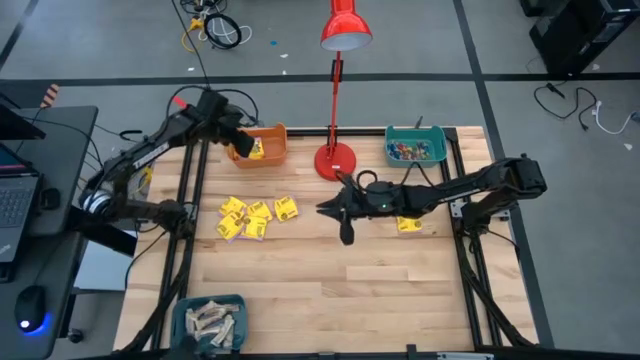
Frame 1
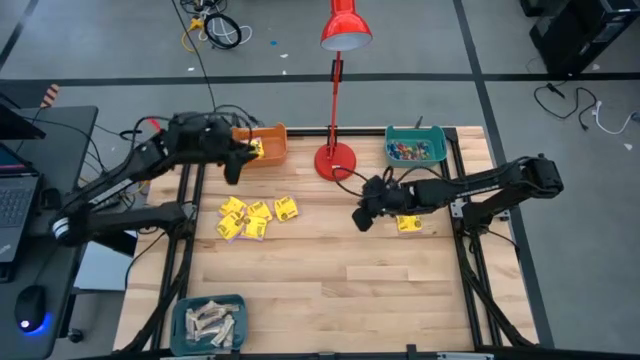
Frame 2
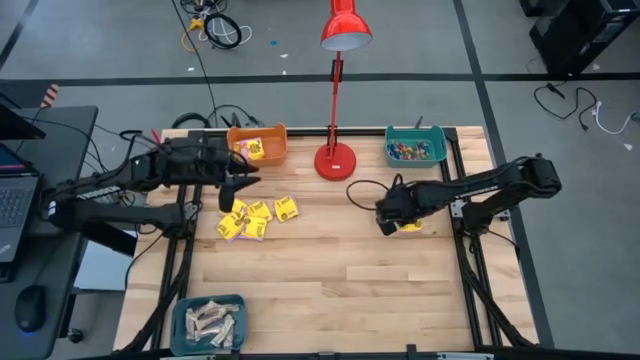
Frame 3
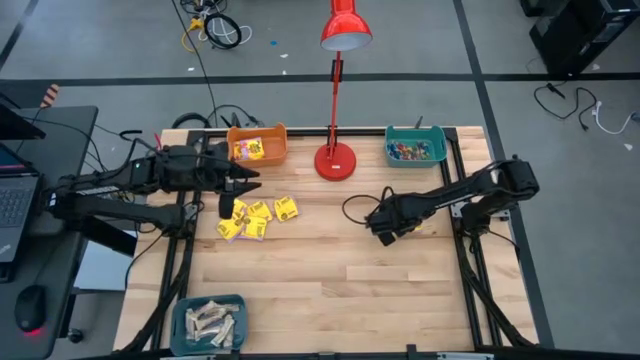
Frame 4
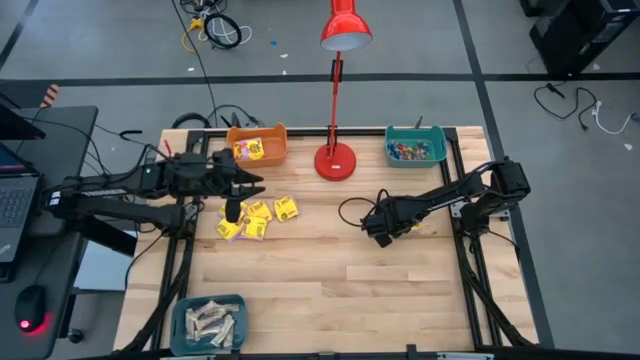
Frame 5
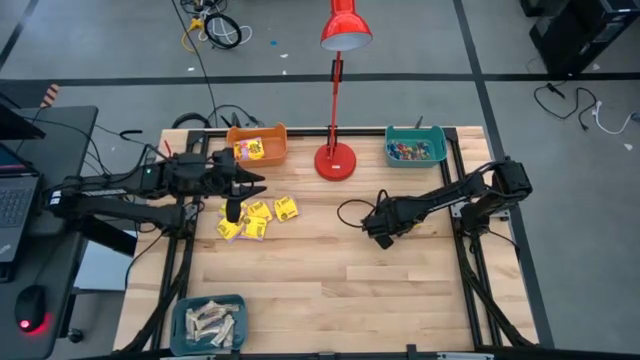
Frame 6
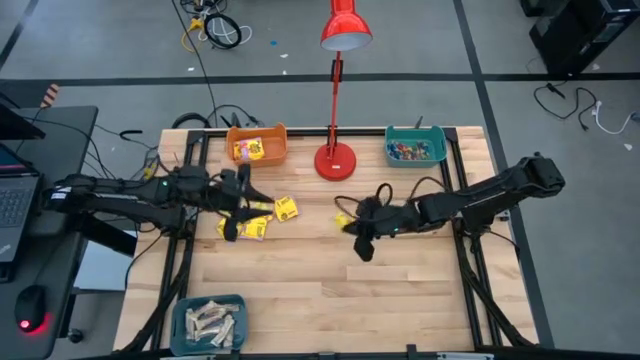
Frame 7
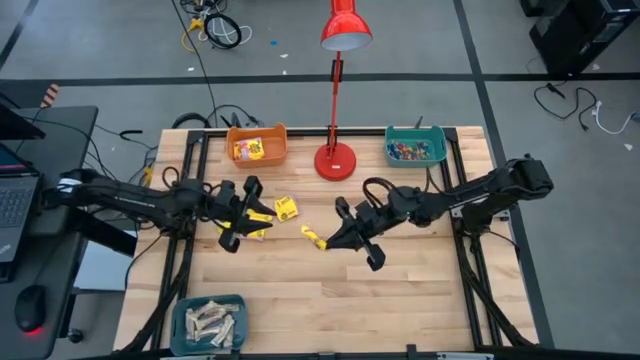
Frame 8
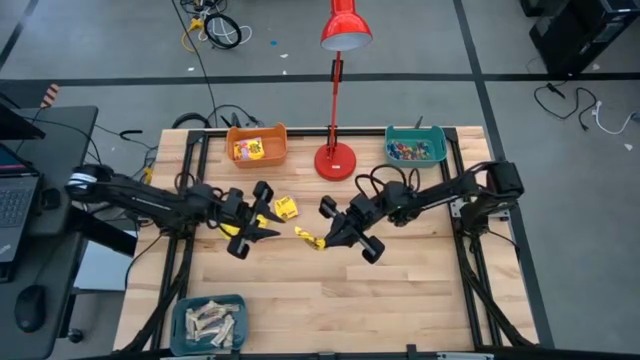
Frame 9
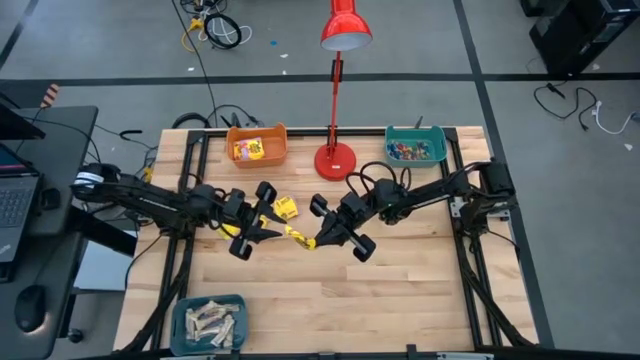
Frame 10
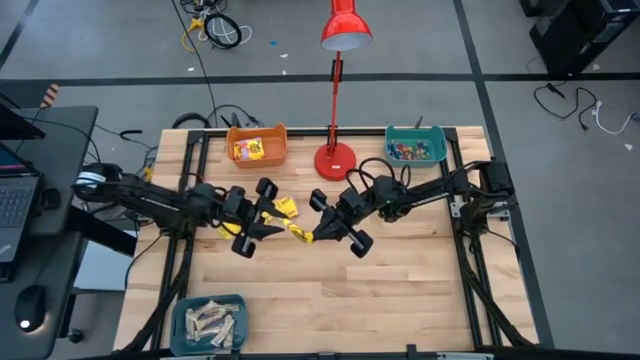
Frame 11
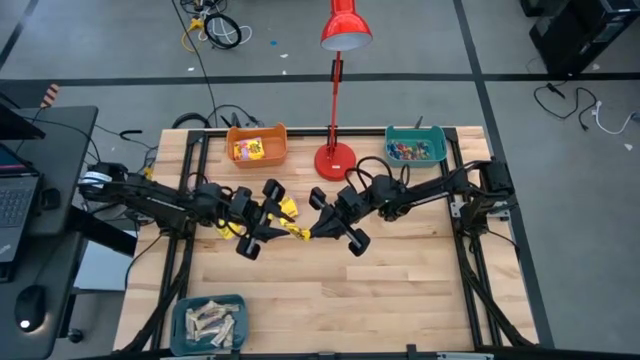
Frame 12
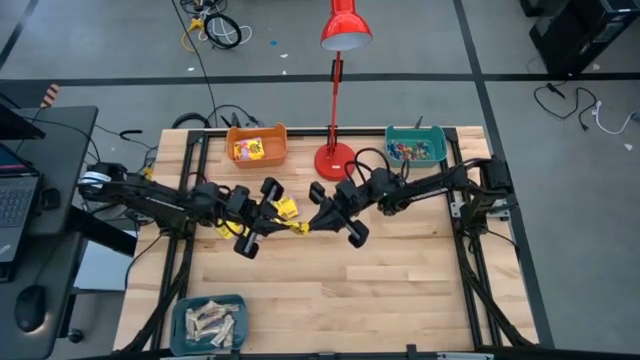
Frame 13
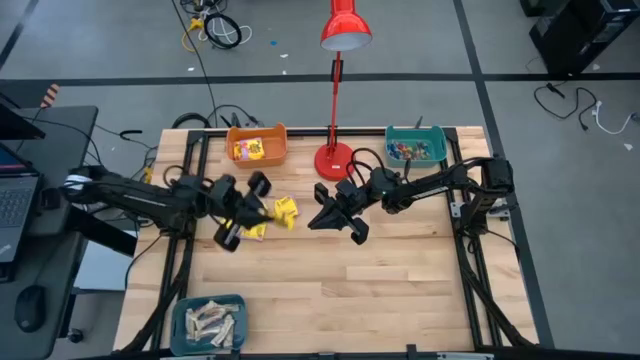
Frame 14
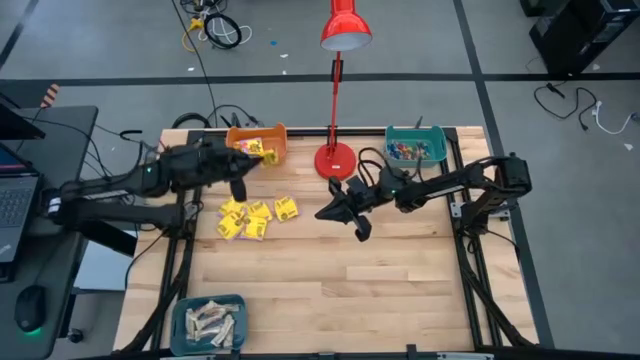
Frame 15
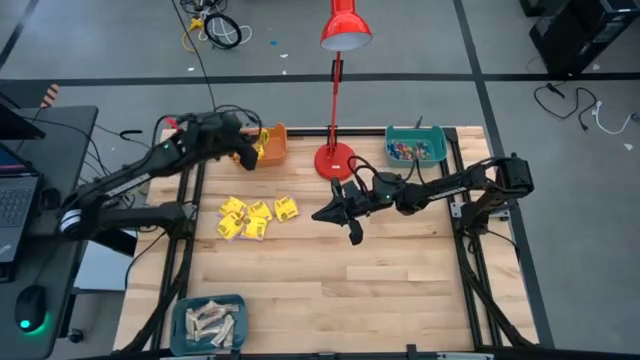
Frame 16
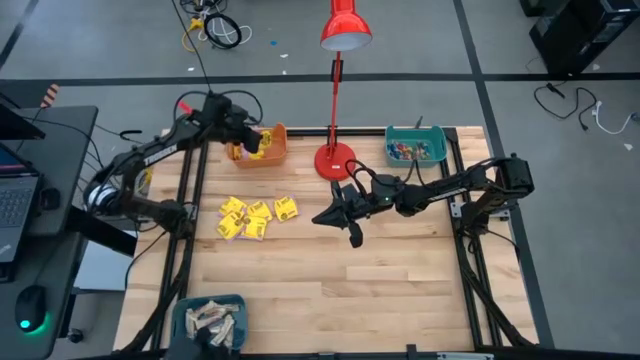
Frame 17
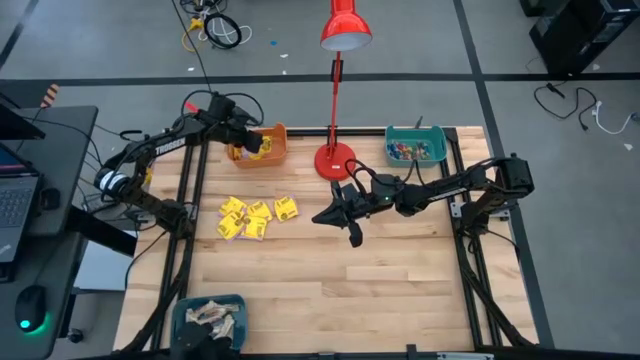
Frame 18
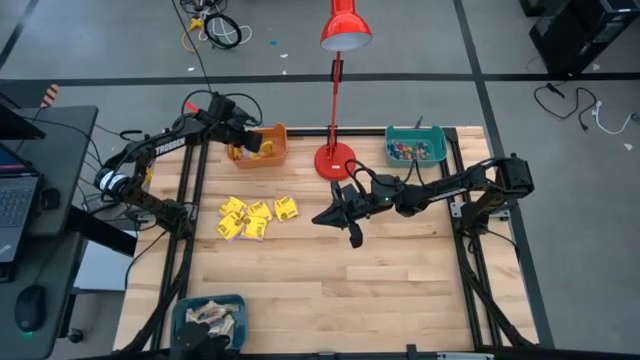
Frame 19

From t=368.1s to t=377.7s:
Task: Sort candy
Put the yellow candy into the orange bin

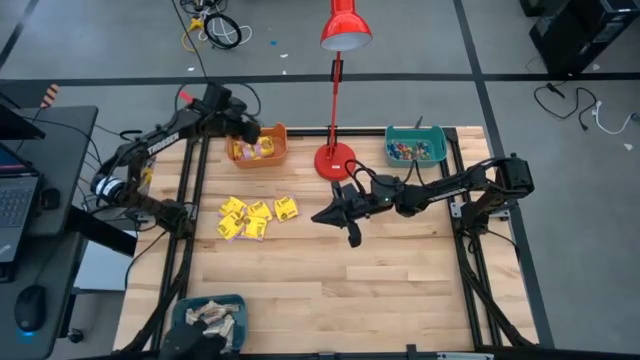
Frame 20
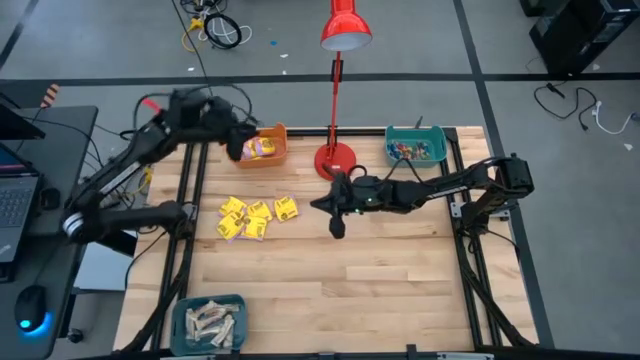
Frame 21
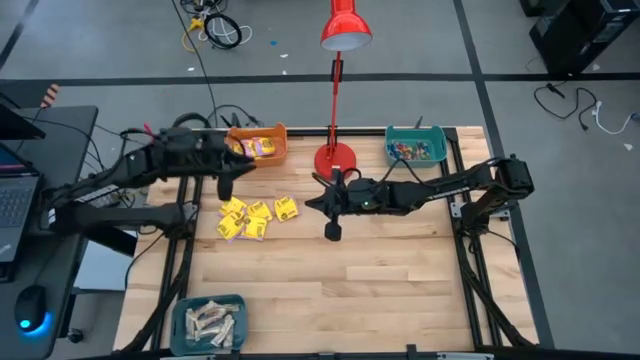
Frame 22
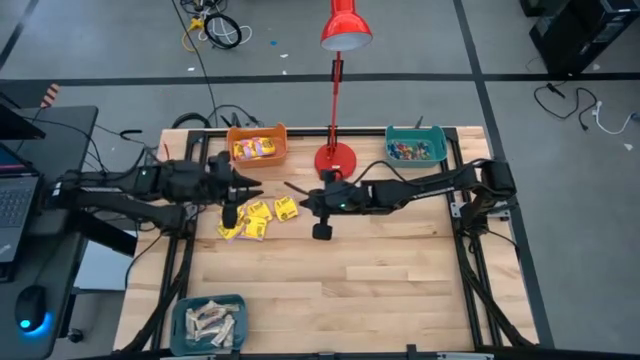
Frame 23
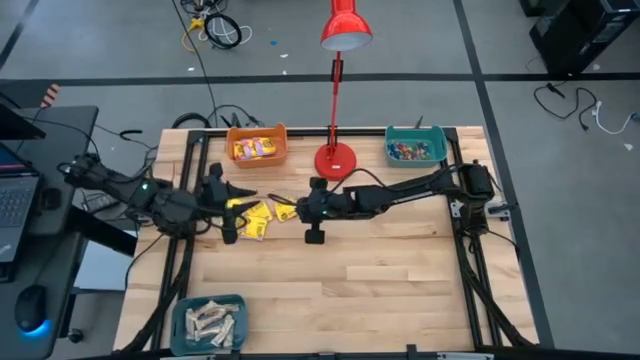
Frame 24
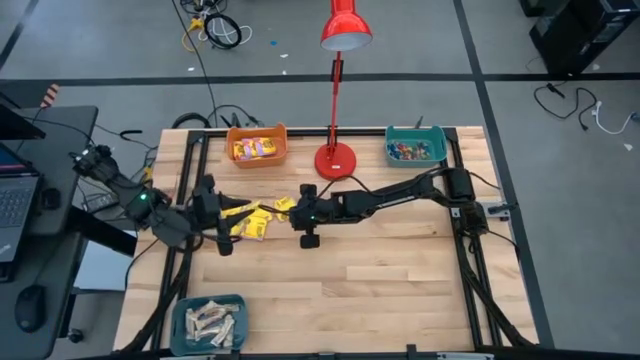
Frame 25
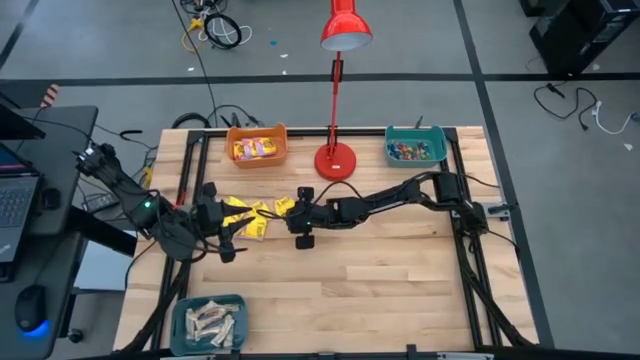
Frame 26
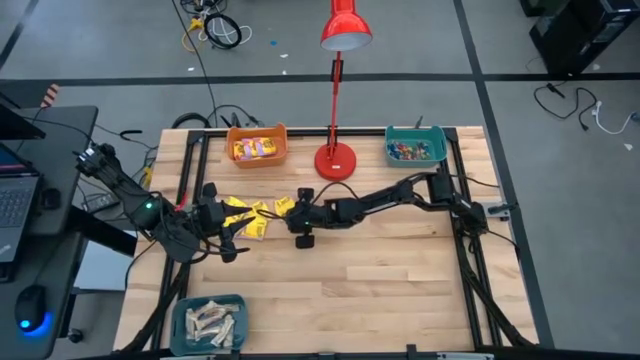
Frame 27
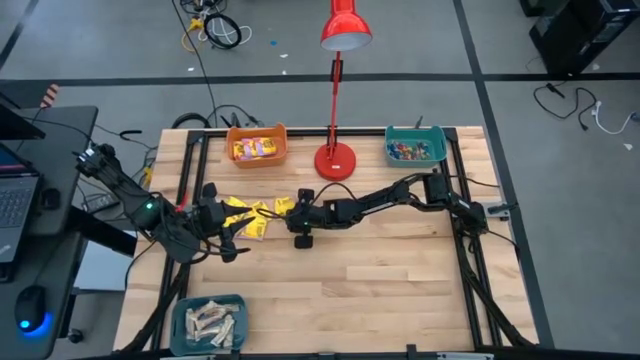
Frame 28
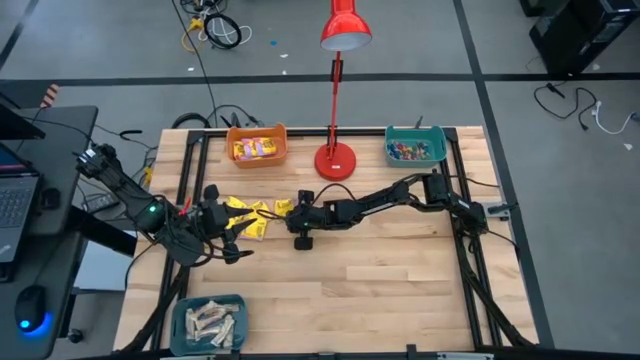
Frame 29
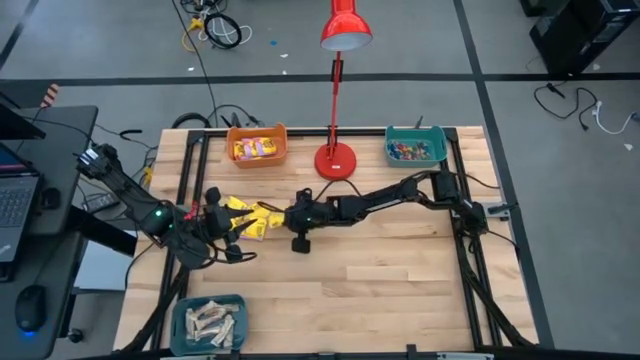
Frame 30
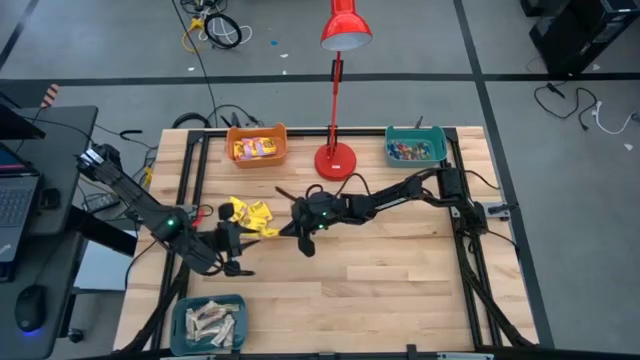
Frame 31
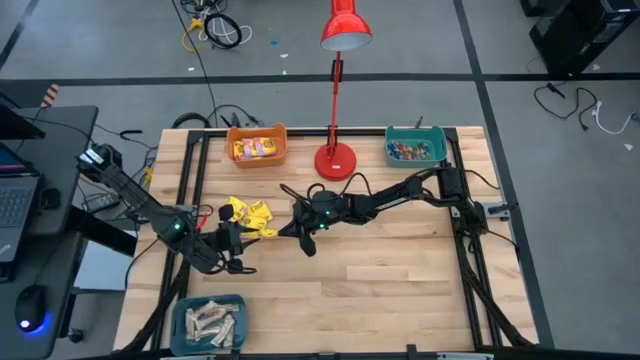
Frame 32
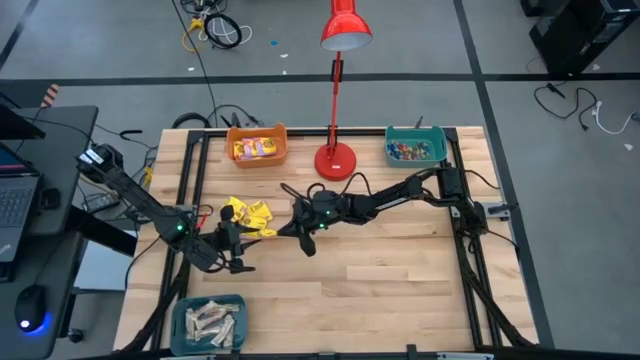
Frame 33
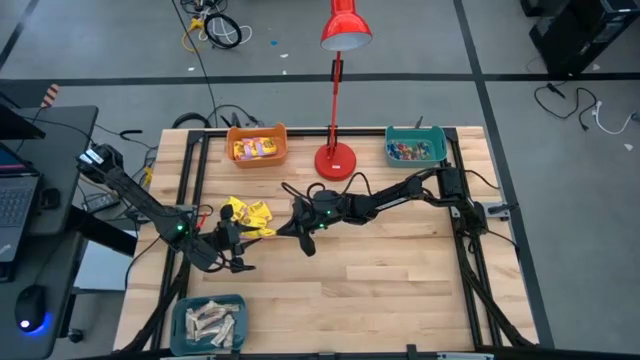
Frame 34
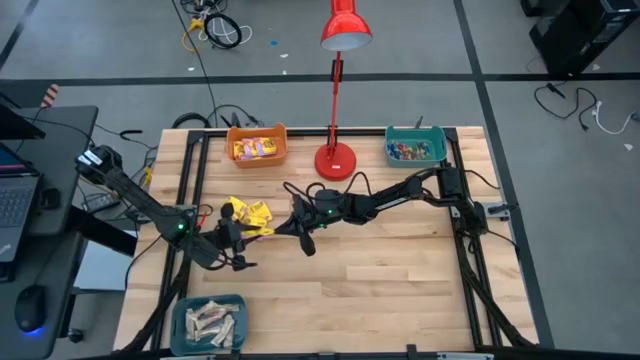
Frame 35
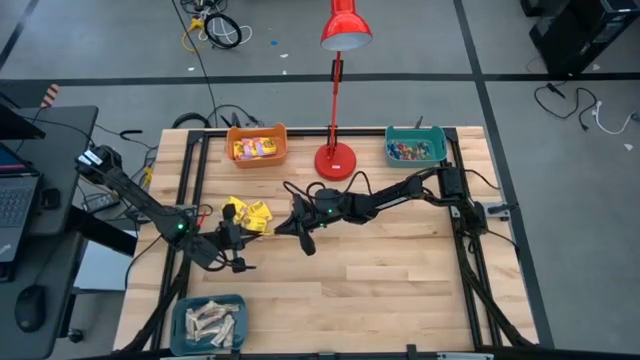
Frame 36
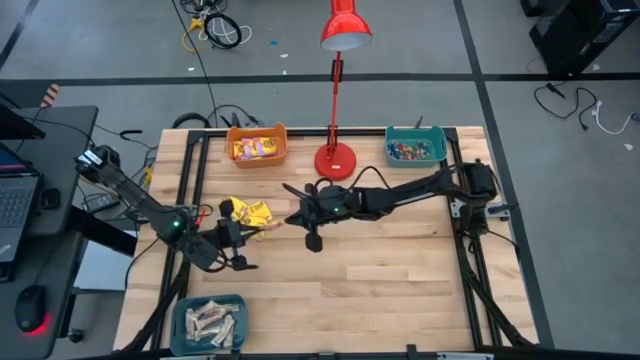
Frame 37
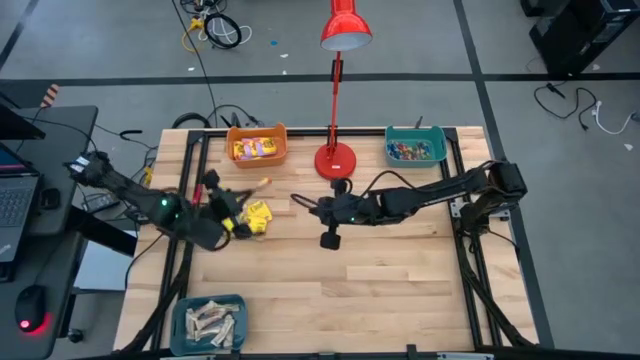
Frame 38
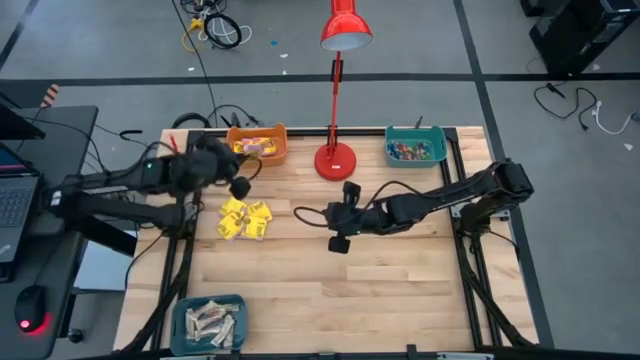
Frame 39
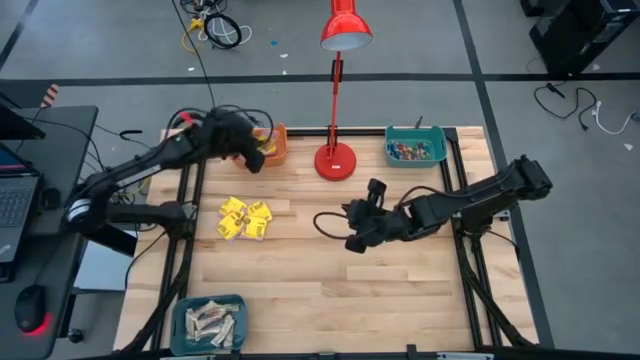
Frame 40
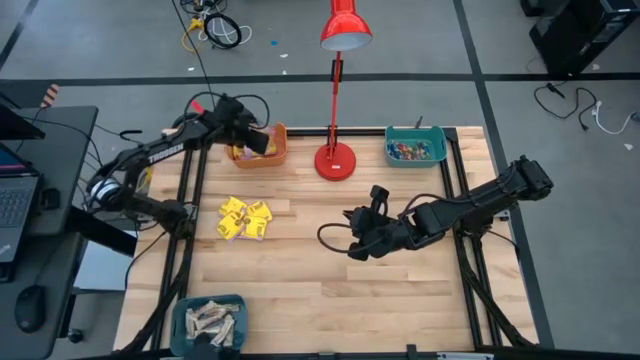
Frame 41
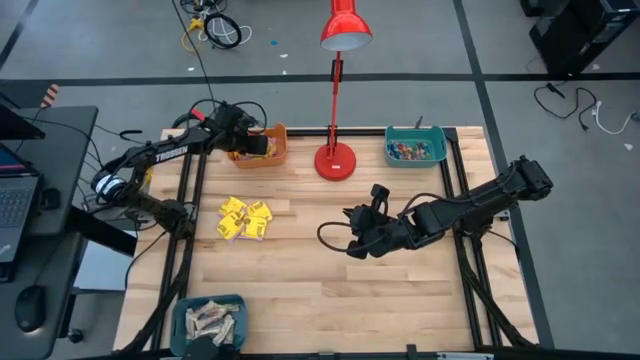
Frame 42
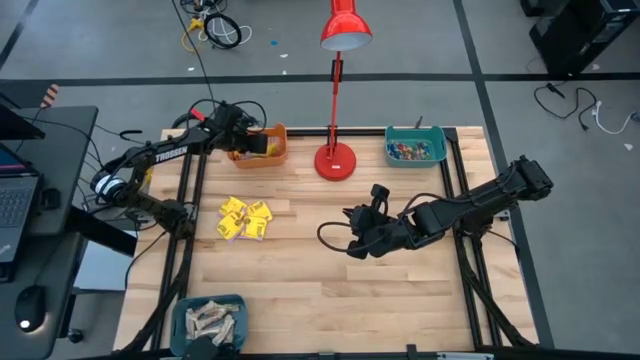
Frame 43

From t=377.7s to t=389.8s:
Put the yellow candy into the orange bin
